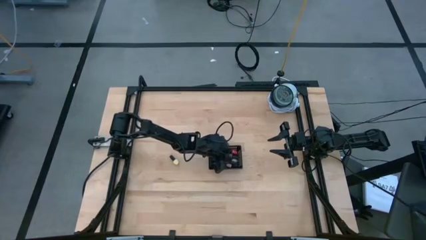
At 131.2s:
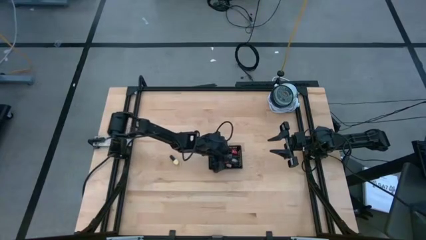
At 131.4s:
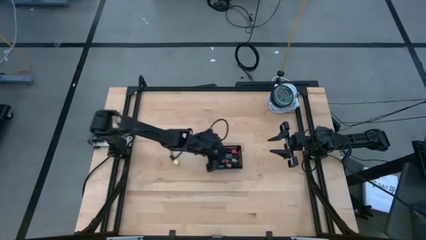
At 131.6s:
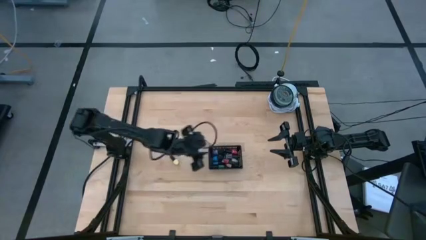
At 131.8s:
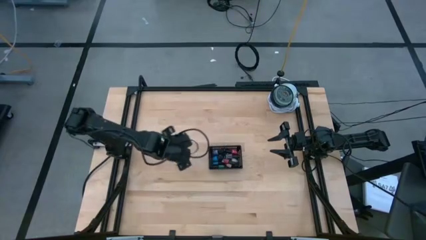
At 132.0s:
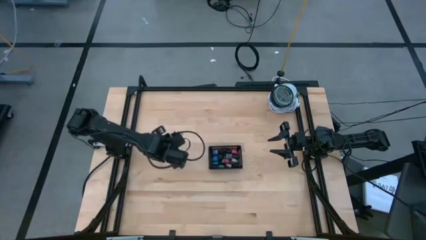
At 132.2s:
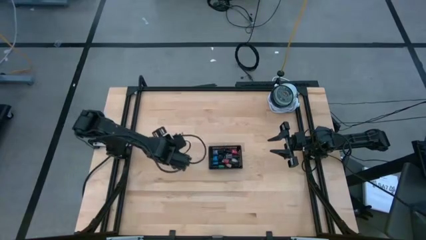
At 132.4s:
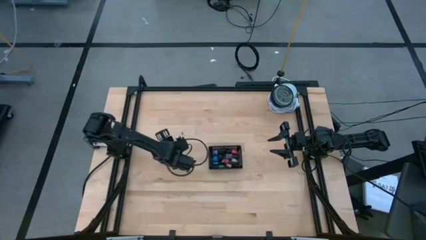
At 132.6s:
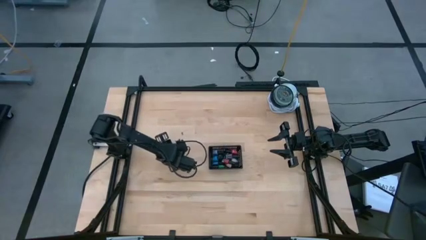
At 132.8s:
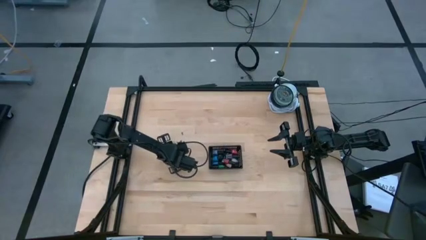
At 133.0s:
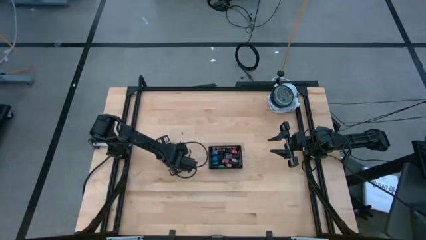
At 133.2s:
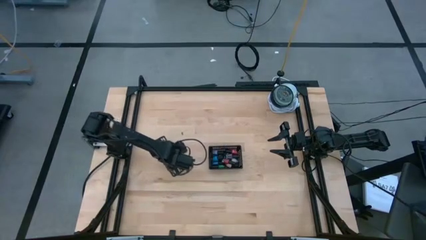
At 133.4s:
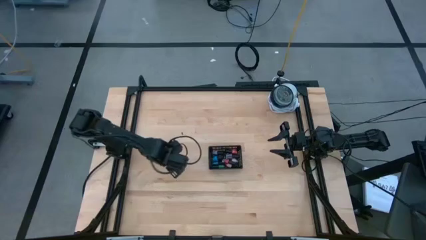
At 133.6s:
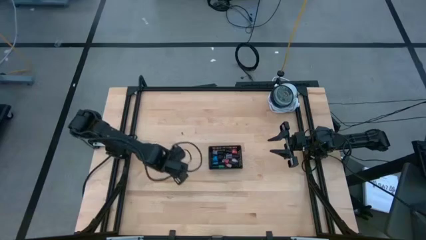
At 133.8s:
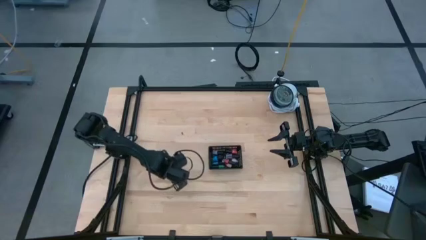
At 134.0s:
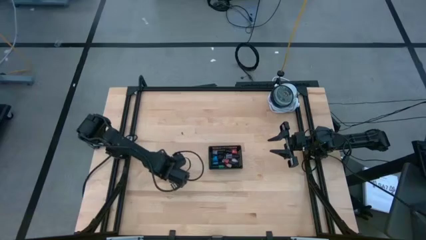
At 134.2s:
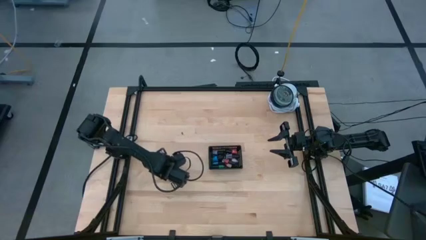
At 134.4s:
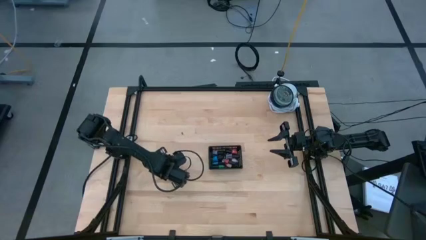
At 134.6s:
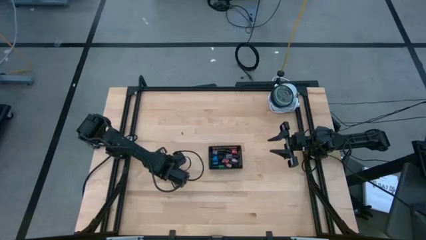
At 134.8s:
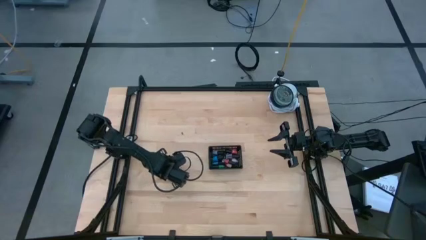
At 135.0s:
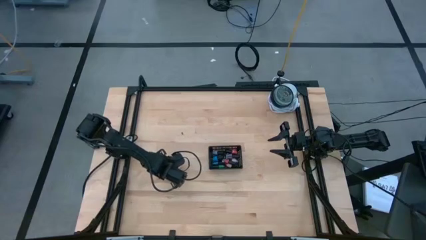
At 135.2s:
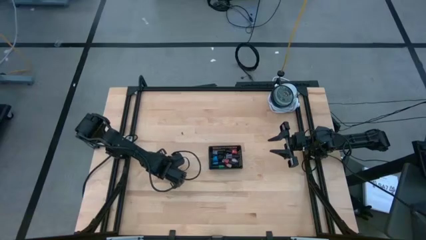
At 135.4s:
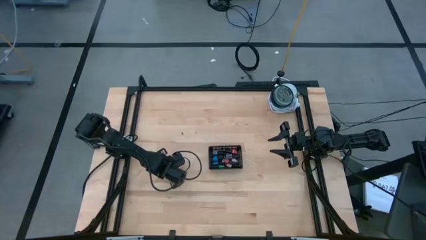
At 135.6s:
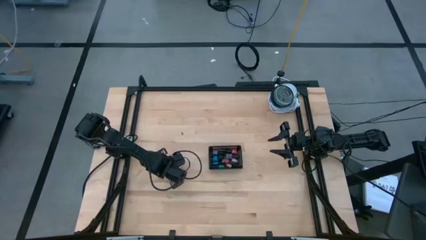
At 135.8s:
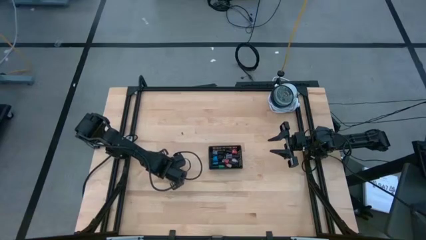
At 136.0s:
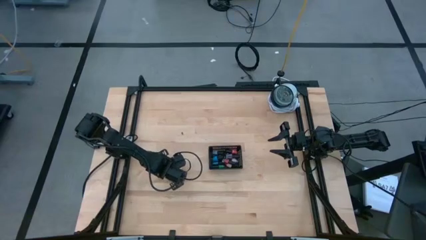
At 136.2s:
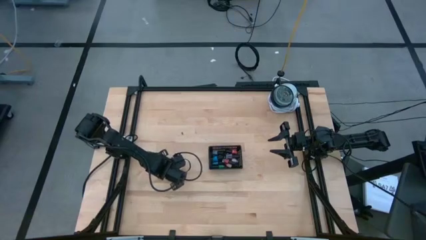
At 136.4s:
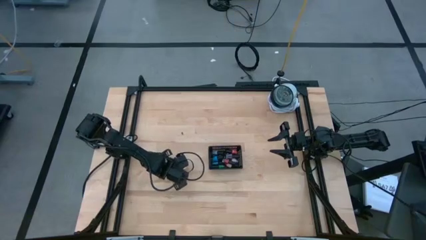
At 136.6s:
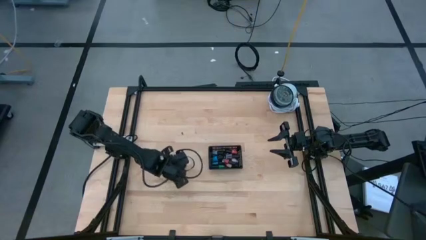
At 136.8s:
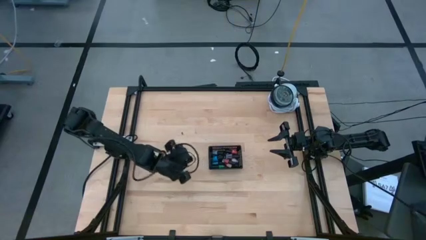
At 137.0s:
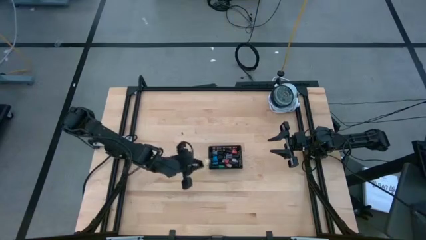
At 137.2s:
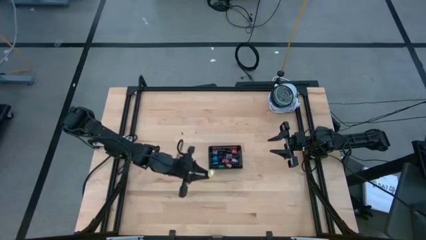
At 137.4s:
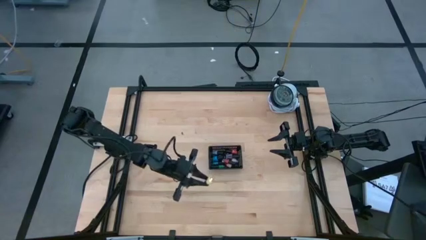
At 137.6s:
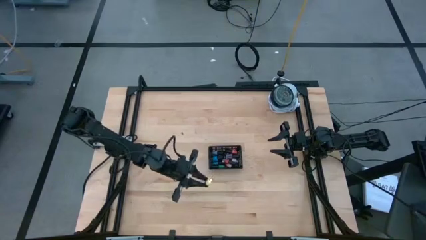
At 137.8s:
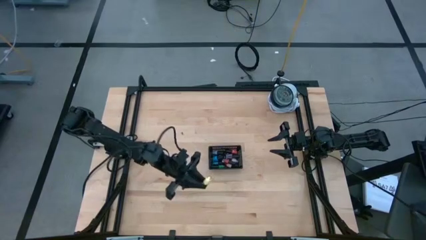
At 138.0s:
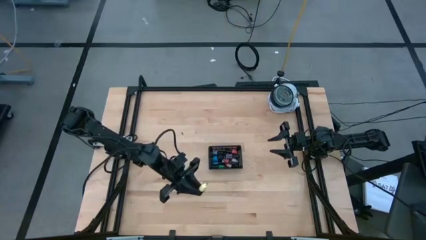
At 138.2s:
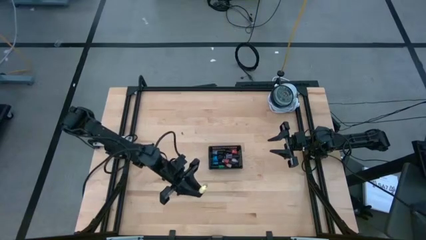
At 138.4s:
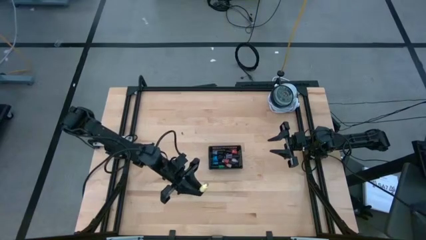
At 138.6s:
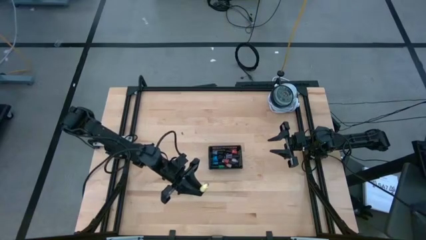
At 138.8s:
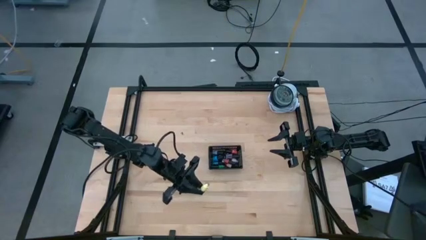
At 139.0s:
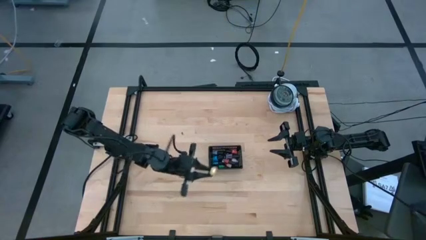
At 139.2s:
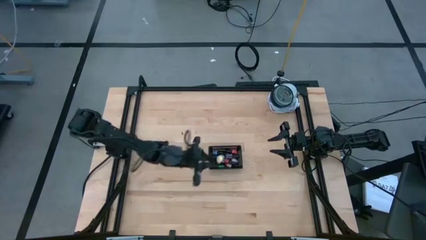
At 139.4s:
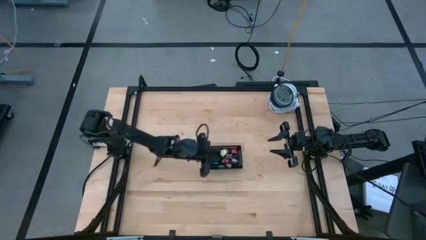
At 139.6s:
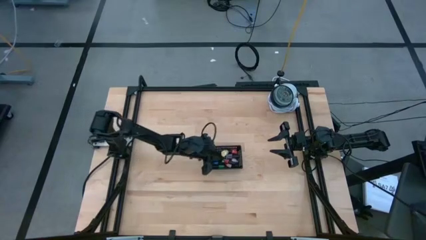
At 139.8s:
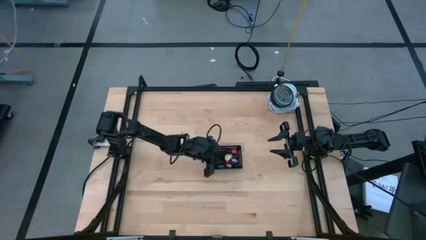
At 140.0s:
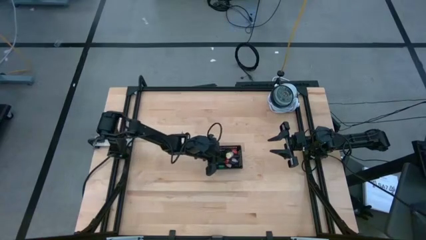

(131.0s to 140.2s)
Task: Pick & Place Nail Polish
Put the yellow nail polish into the black bin

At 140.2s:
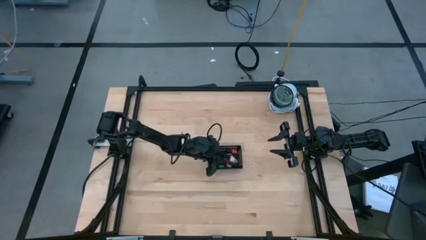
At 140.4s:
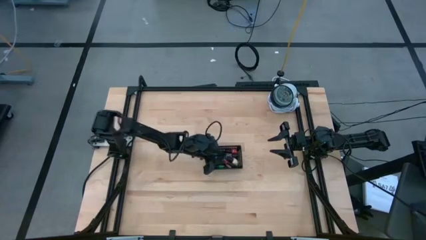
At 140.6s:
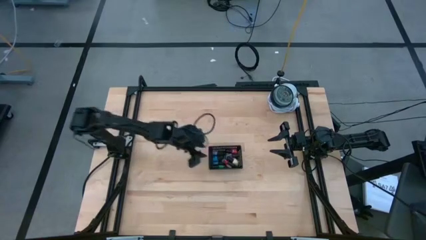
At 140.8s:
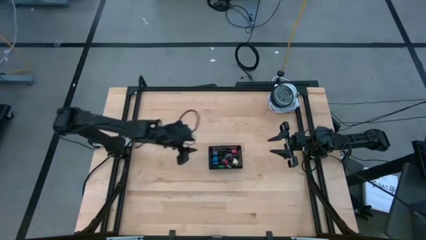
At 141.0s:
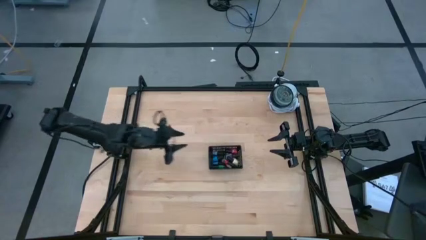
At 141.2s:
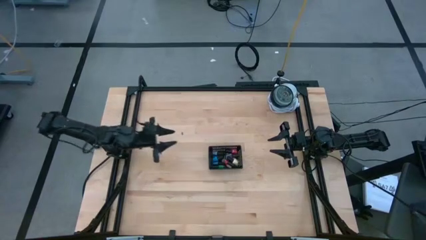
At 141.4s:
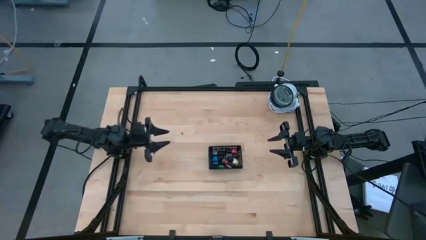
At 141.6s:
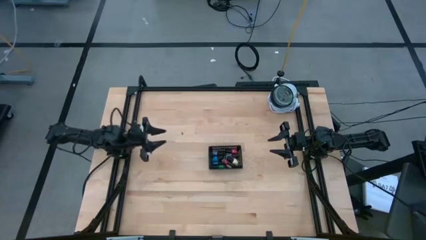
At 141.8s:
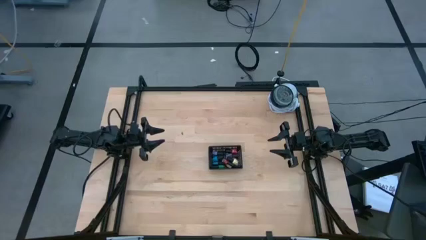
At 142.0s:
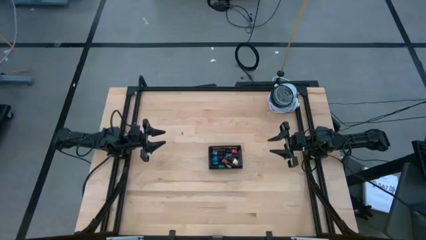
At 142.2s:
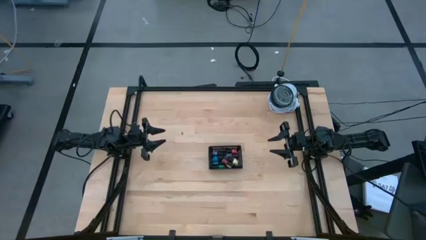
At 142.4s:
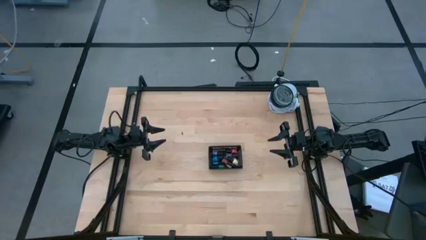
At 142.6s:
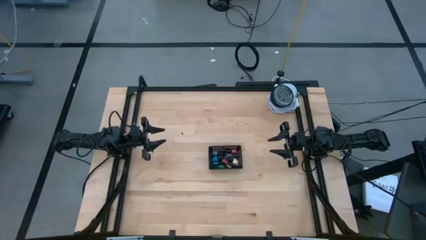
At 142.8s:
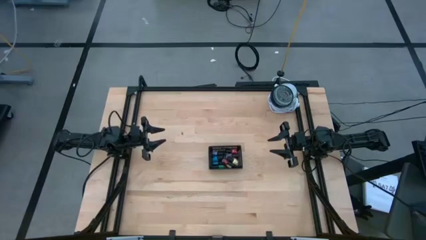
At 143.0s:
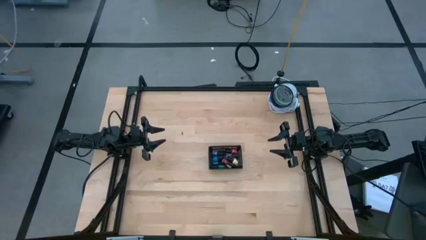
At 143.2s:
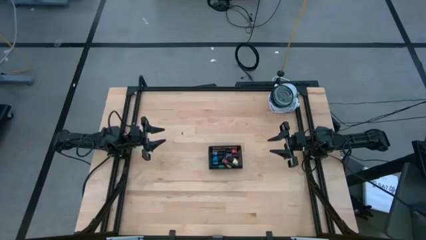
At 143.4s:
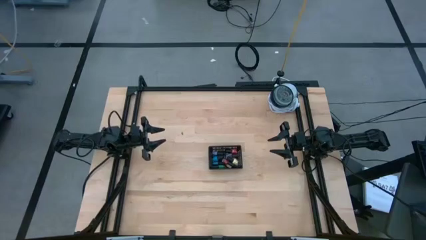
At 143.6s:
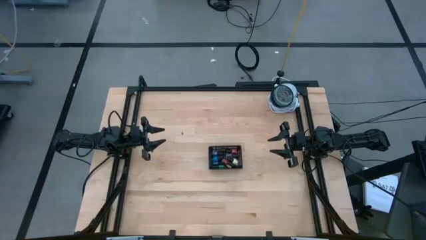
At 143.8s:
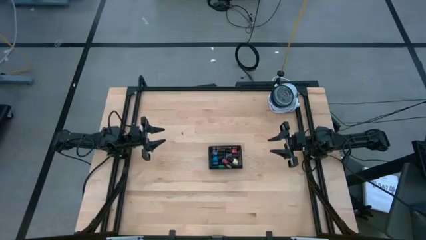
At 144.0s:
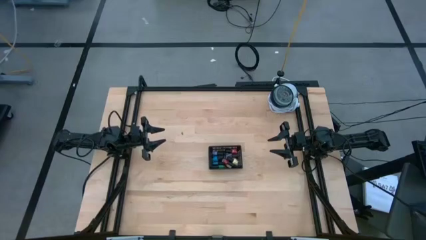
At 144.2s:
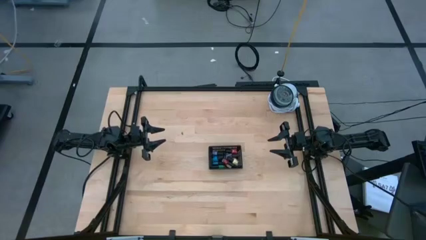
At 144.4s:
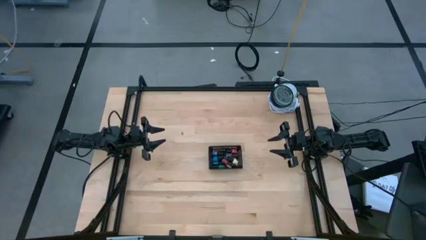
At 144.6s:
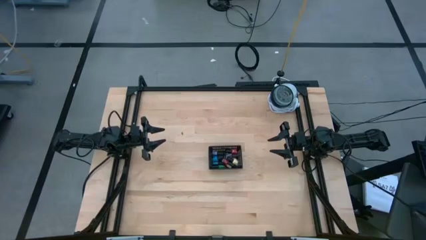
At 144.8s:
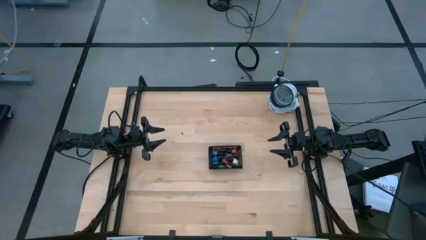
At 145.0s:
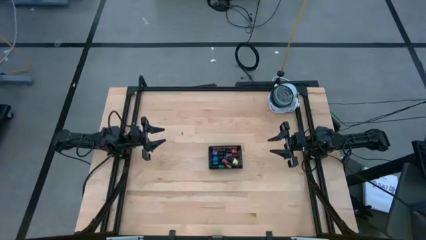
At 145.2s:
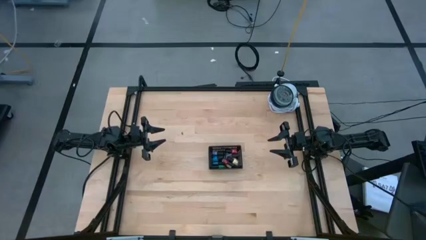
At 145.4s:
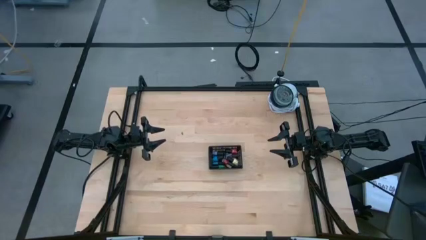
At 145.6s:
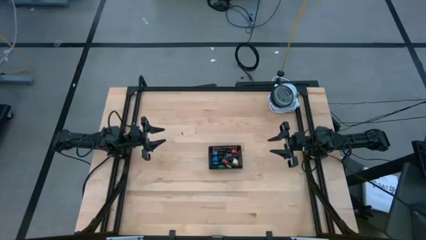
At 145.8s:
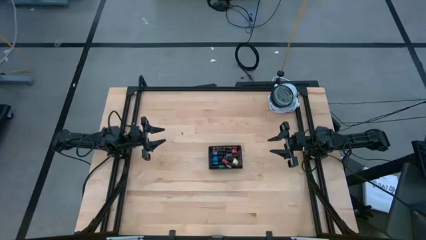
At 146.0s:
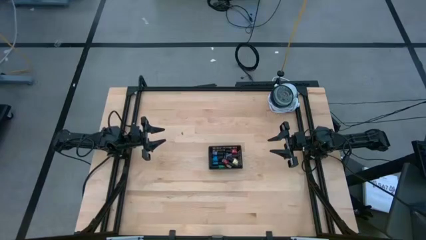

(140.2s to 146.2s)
Return to Home Position

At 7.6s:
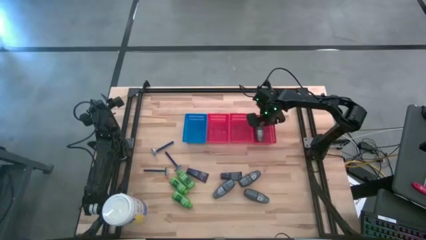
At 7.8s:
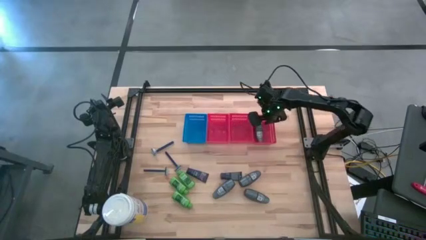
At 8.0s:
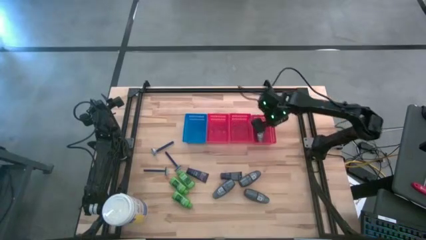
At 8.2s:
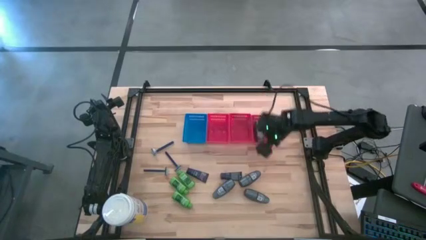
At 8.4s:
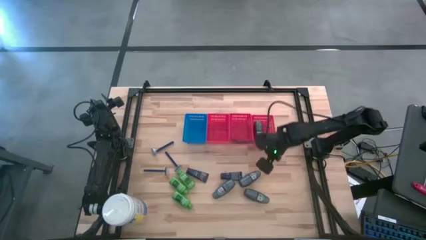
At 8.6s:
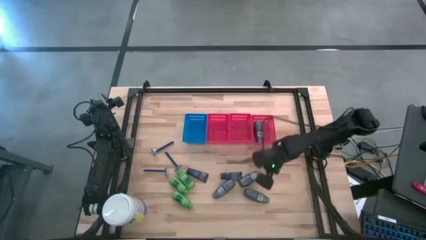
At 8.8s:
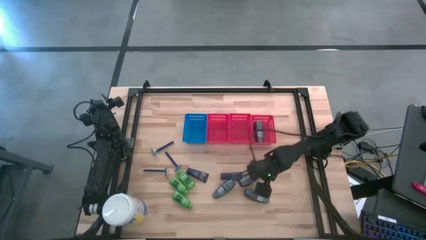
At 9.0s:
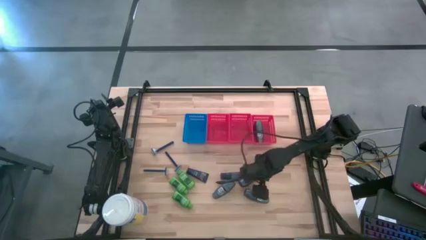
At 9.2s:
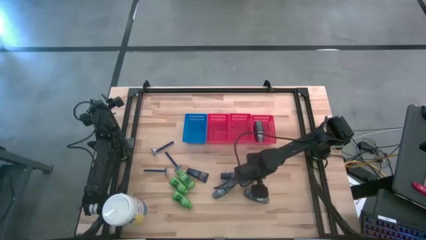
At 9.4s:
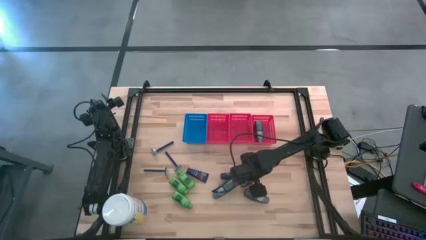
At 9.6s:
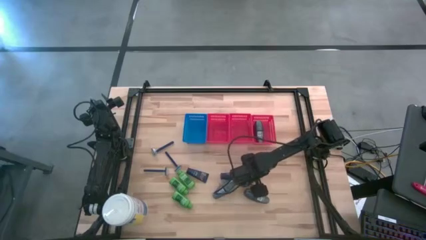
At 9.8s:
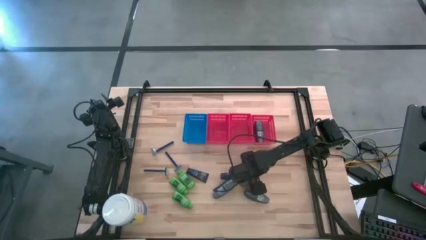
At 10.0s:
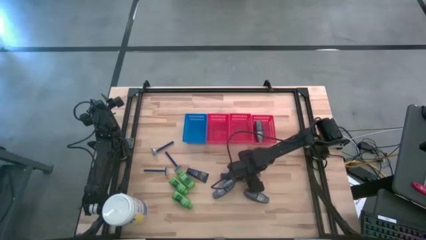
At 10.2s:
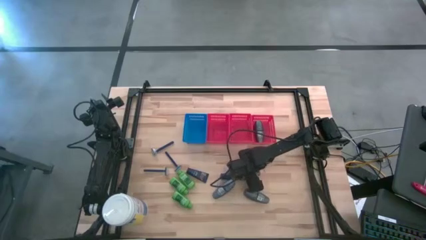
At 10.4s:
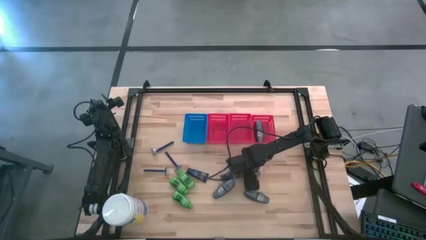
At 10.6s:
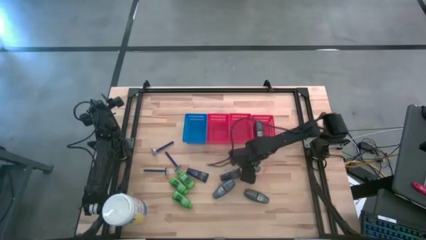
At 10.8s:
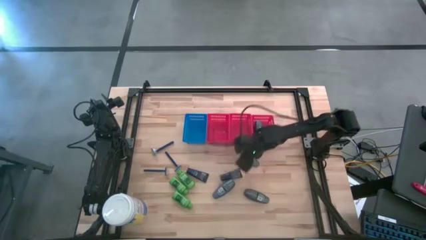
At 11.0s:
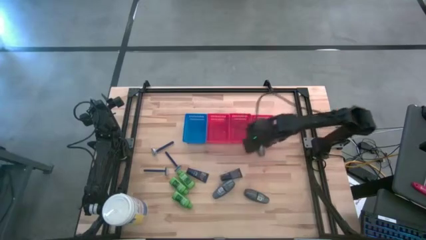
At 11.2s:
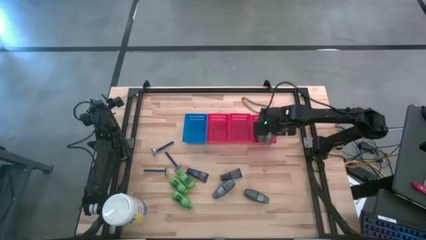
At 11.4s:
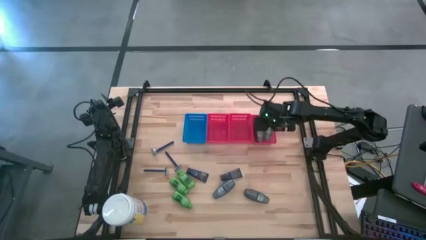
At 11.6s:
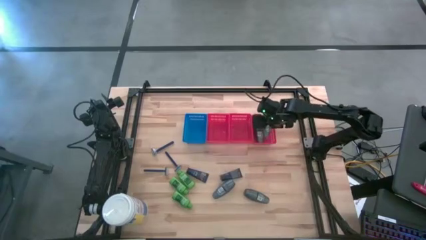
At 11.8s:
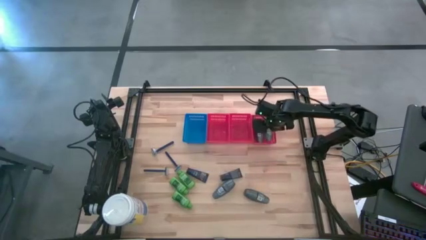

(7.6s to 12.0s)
Task: Pick & Place Travel size toiletries
Put the gray deodorant into the right red bin
